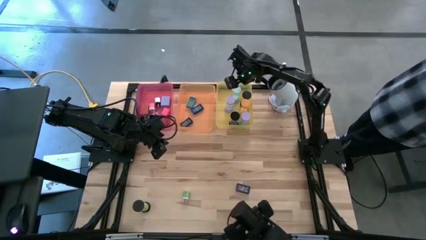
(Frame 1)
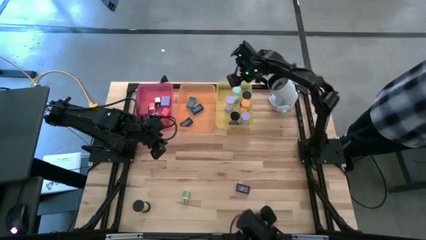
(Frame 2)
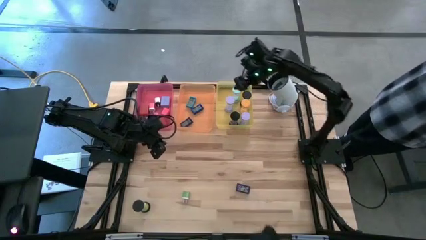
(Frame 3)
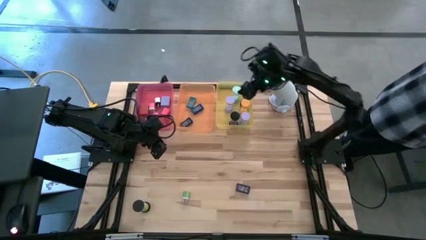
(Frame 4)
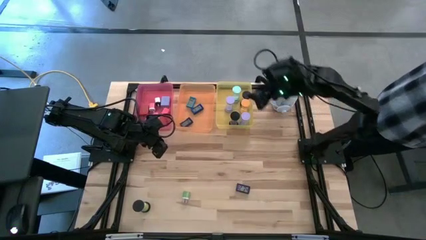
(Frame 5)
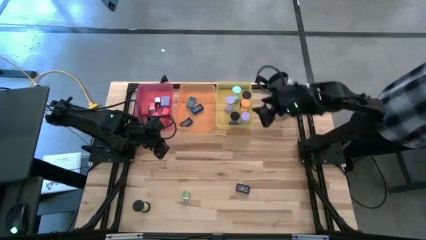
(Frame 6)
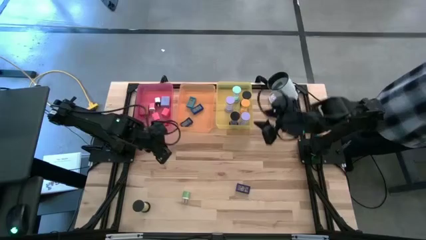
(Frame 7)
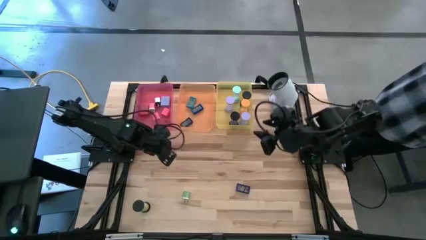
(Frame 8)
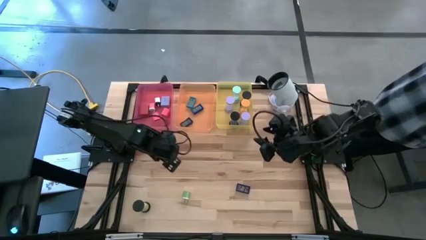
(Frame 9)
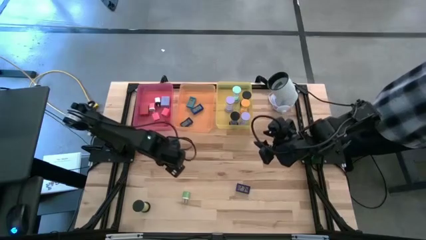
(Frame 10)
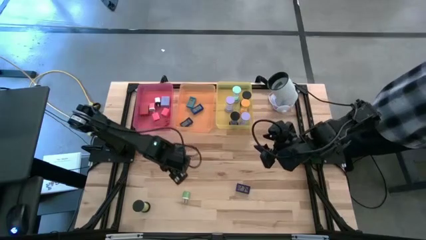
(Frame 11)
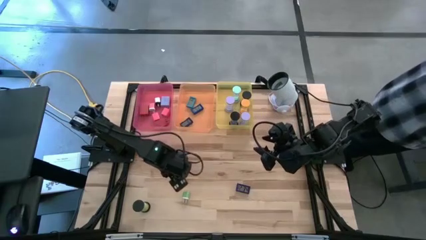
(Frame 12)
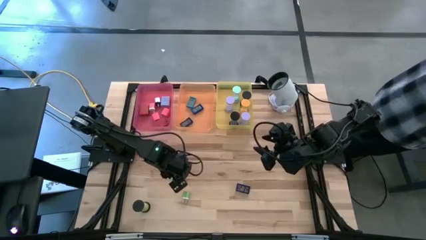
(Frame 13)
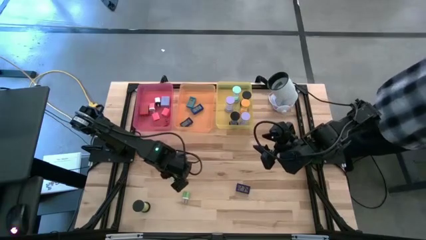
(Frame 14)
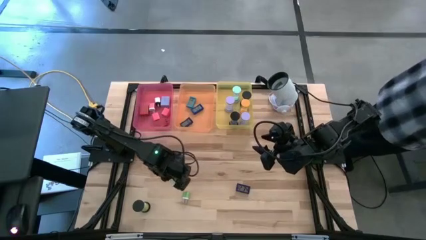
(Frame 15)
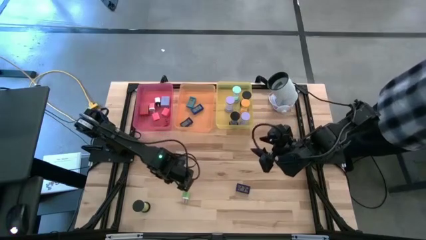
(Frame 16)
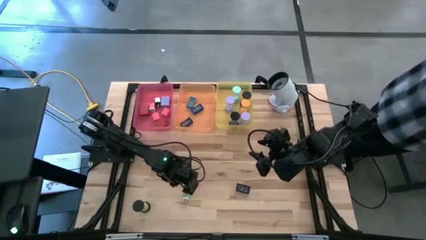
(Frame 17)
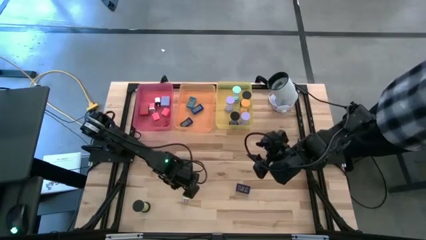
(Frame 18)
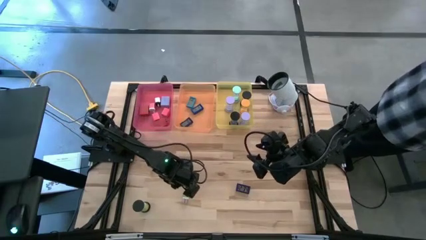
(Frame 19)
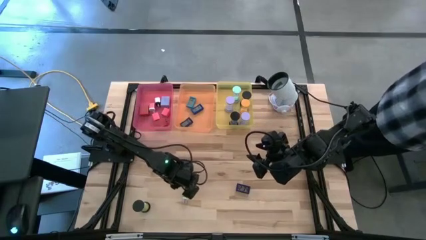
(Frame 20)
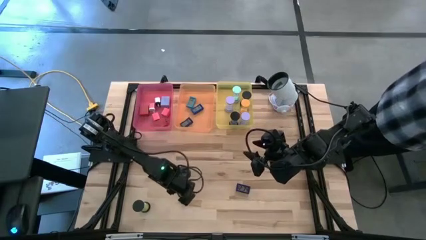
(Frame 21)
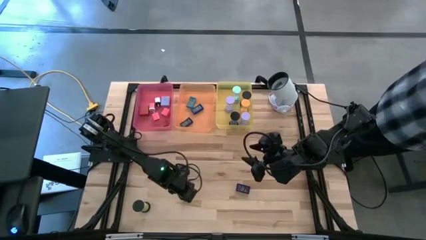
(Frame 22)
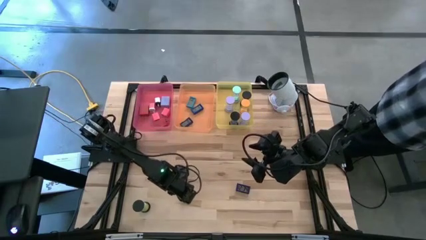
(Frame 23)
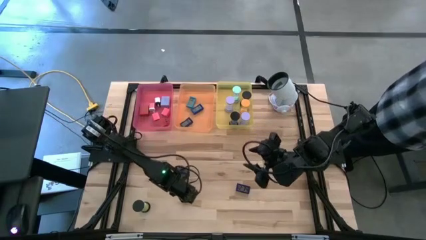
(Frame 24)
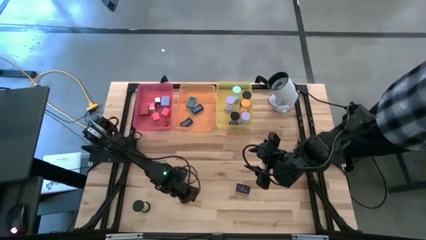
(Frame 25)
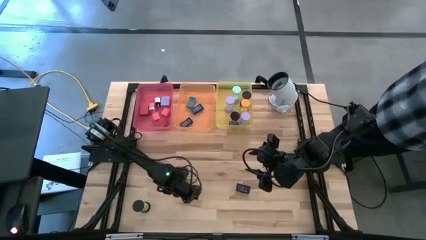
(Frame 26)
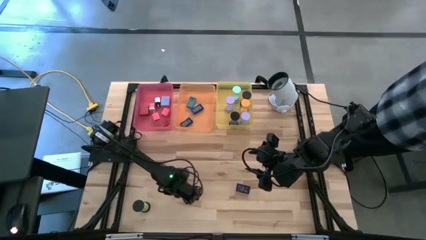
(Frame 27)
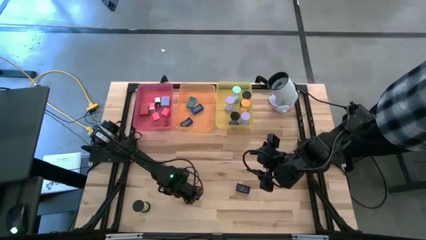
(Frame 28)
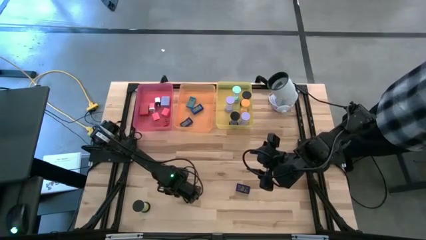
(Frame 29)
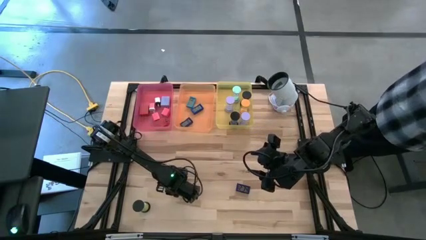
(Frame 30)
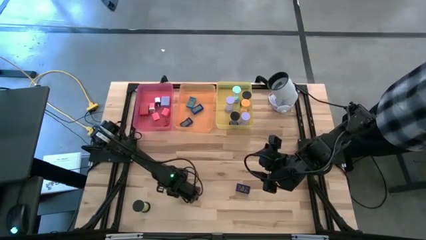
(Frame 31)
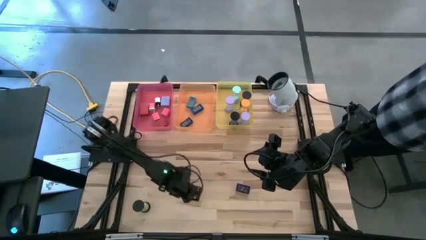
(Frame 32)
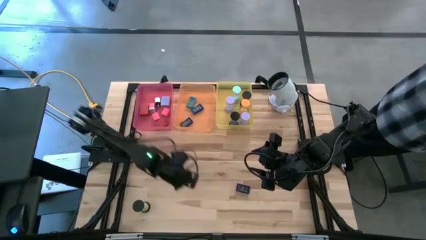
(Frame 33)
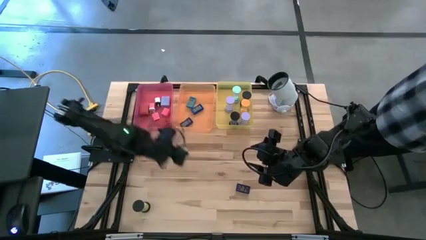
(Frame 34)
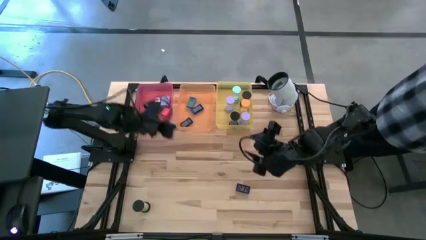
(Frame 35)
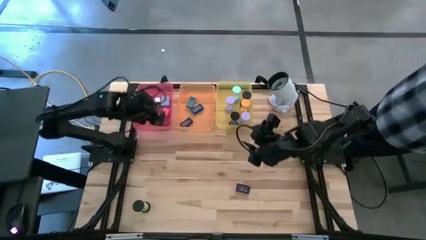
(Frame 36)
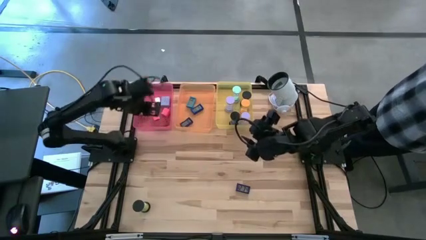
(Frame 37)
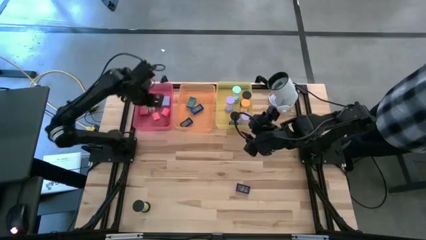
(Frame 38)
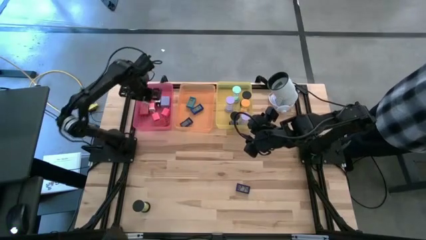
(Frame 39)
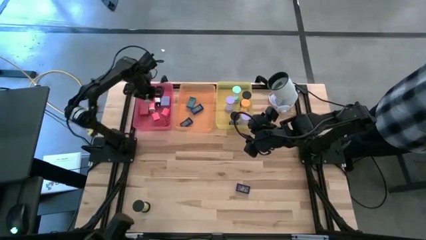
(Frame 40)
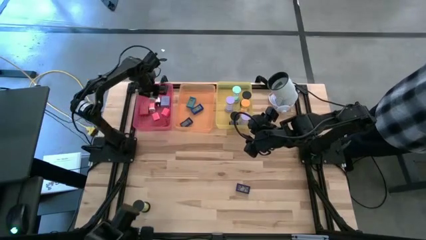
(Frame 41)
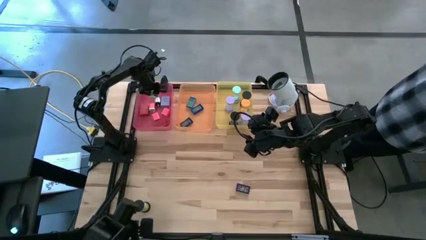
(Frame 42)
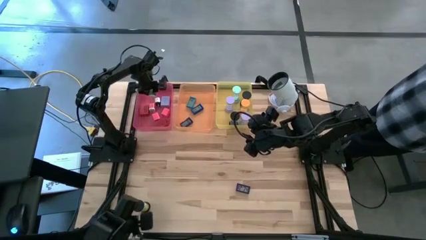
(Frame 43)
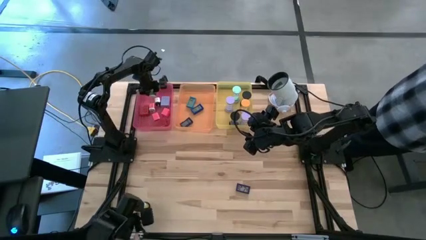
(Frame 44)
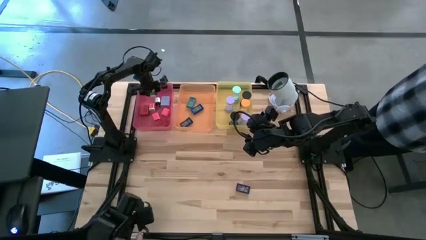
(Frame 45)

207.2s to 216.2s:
Task: Pick & Place Office items
Put the green charger adapter into the red bin

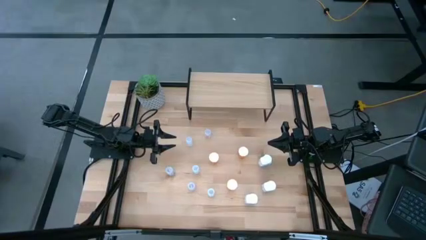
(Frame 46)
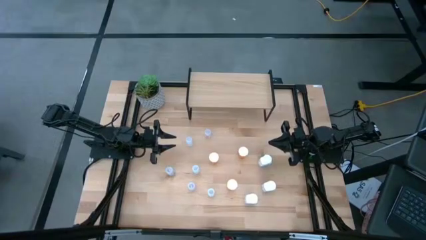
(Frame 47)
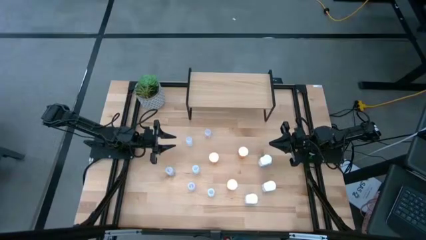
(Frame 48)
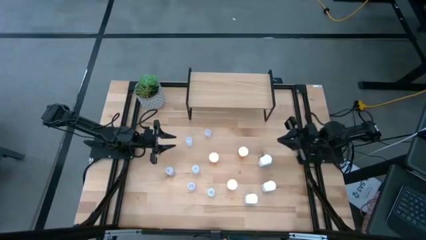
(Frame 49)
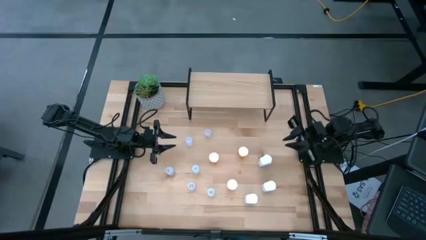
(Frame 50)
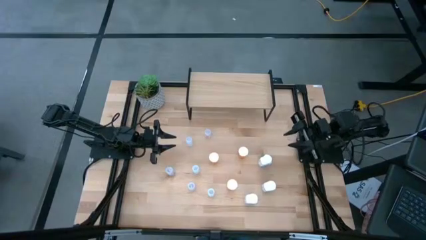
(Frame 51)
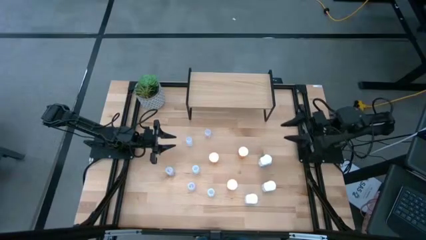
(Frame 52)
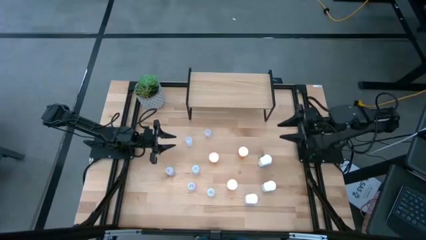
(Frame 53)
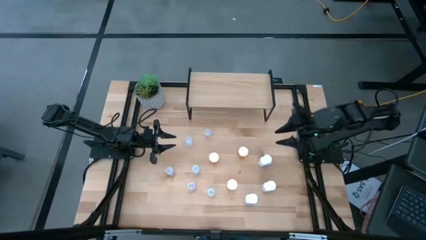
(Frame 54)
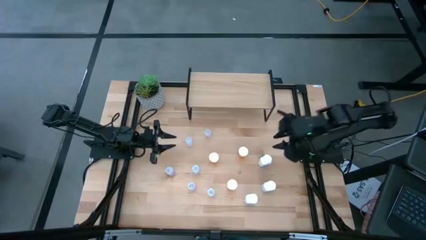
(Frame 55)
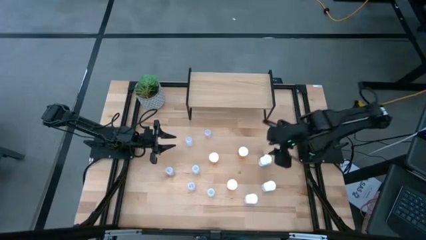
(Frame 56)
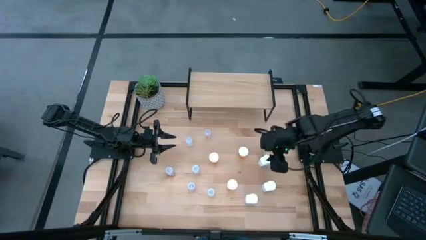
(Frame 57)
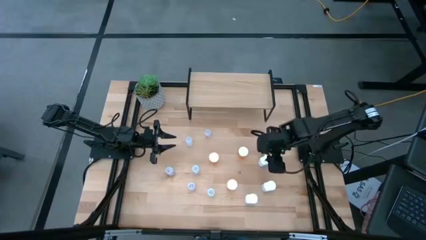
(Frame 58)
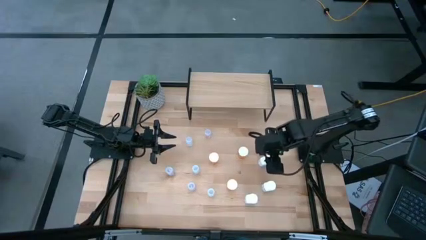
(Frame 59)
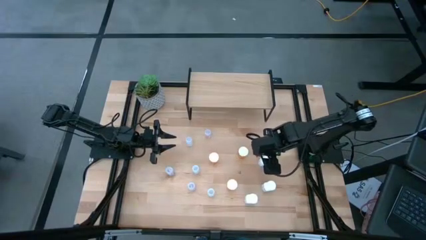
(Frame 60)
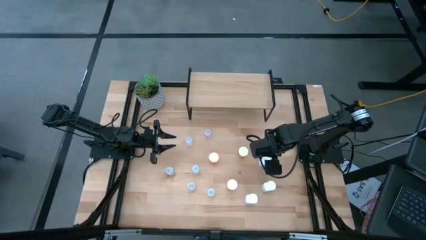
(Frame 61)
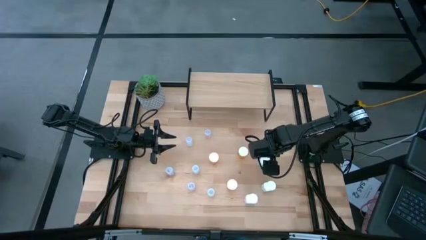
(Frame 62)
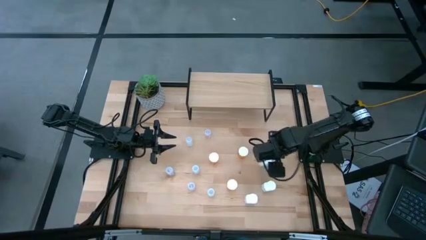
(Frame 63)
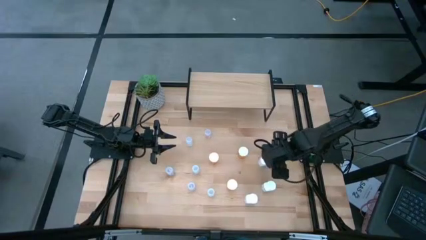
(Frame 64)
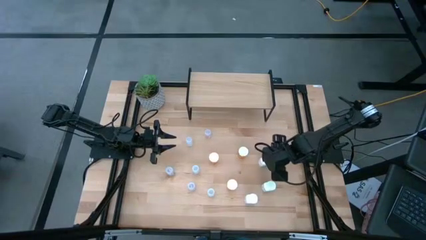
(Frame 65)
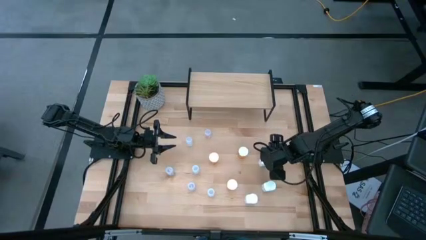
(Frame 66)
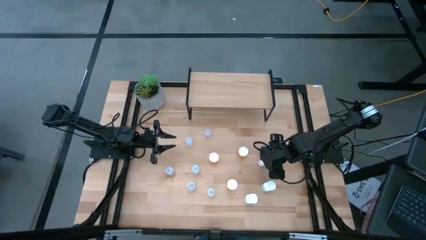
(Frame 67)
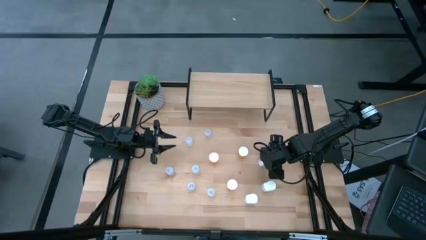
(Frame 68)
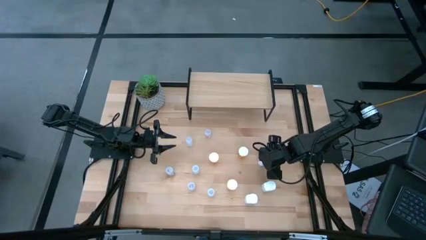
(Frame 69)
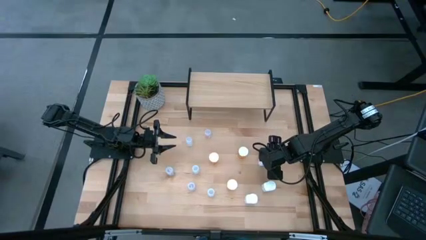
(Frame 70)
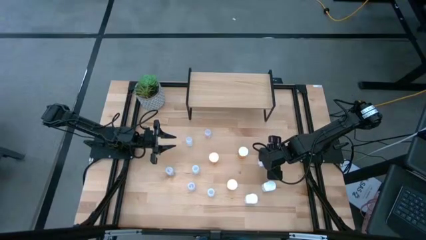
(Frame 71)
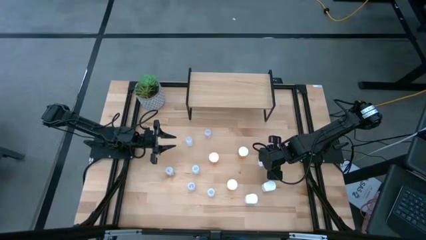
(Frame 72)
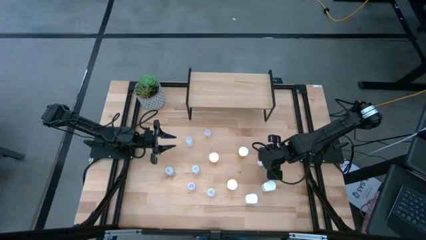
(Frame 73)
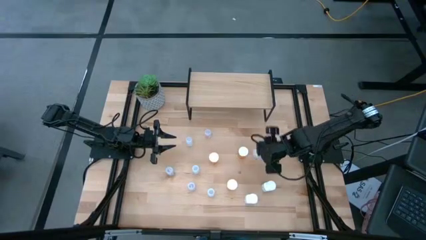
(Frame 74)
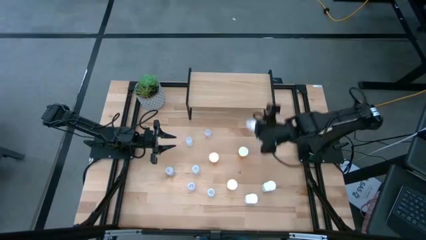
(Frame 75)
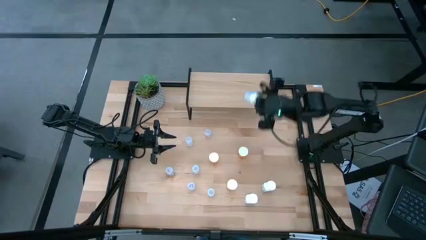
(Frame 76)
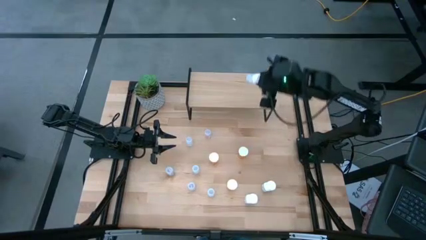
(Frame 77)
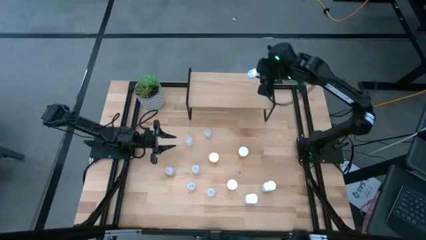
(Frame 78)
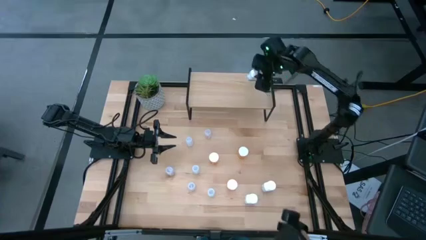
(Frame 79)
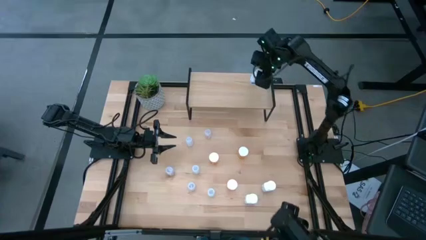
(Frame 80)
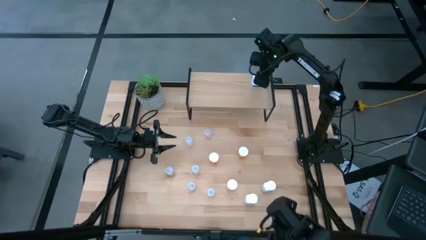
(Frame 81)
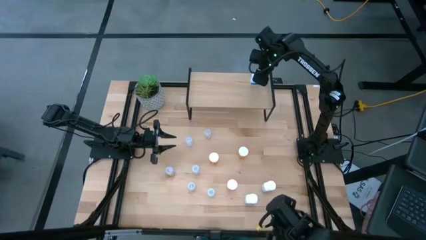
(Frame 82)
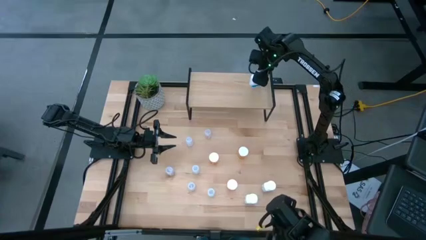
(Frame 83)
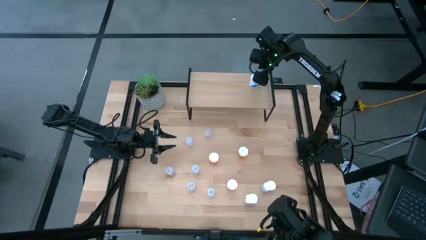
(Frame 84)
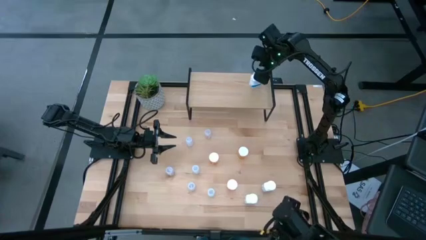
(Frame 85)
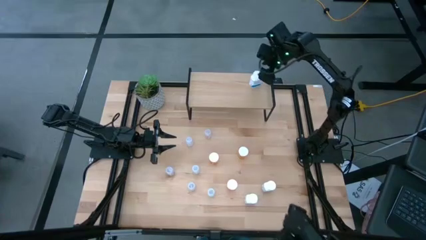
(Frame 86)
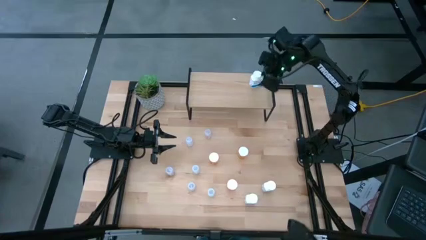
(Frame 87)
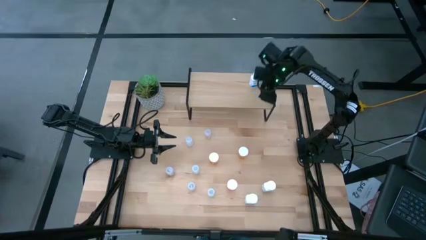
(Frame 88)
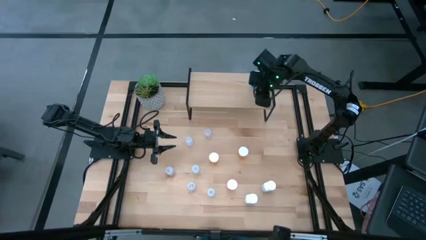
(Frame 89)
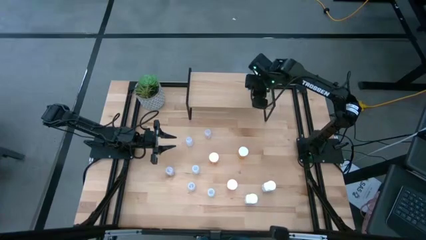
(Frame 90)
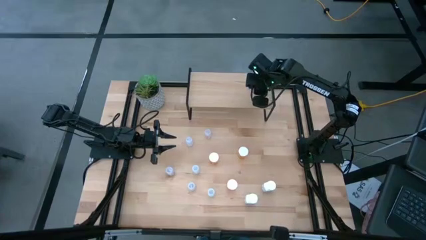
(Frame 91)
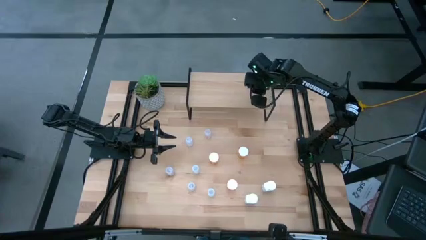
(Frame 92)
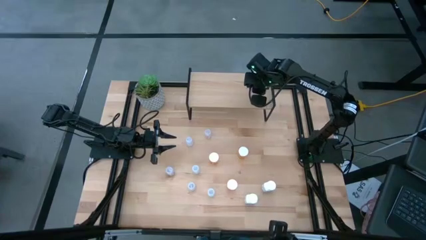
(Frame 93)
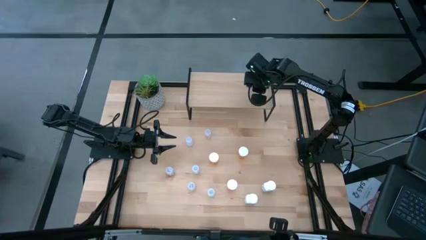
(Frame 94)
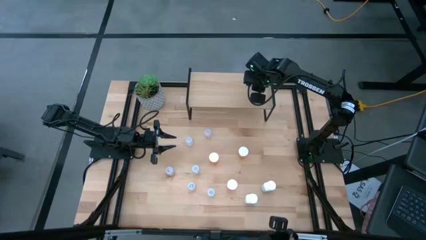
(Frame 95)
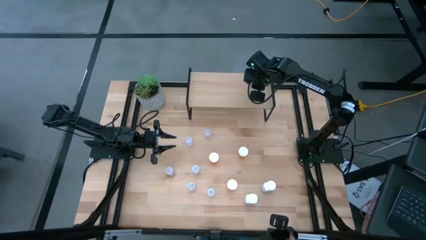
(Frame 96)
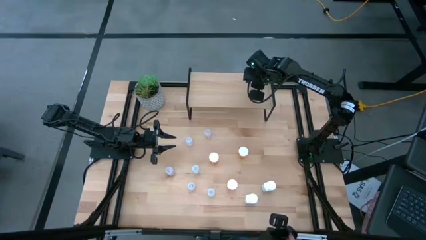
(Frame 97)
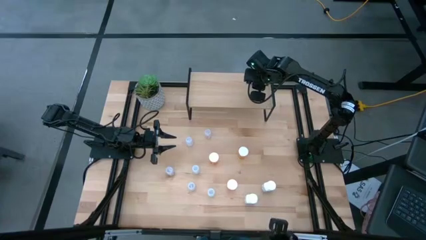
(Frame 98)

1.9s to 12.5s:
Task: Pick and place medicine bottles onto shelf by color
Put the top white supplement bottle on the shelf
